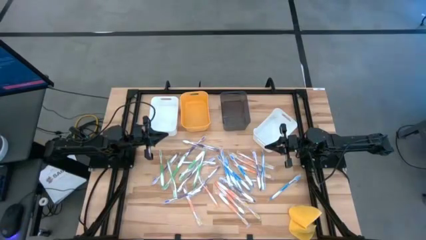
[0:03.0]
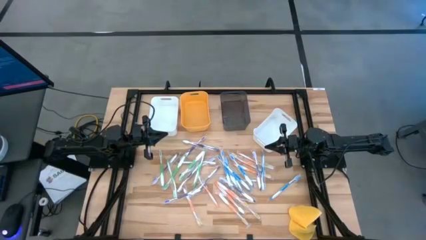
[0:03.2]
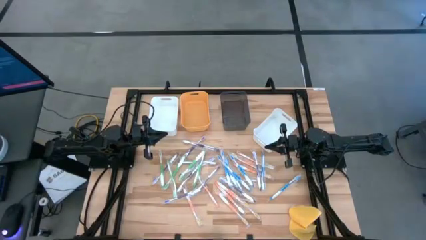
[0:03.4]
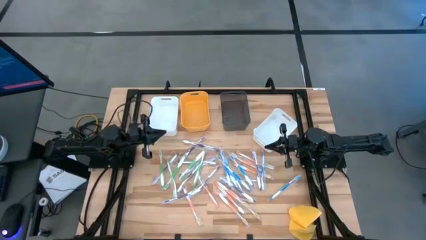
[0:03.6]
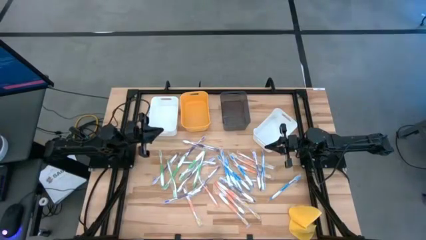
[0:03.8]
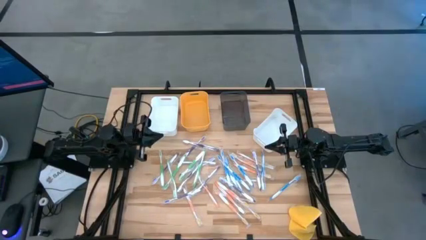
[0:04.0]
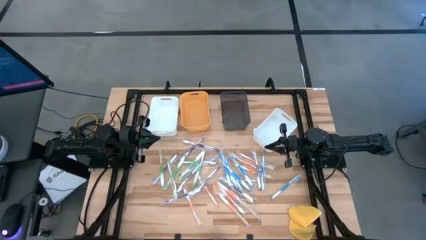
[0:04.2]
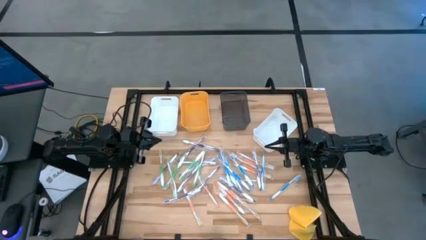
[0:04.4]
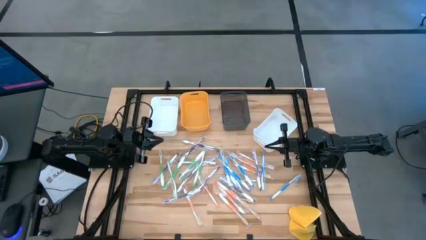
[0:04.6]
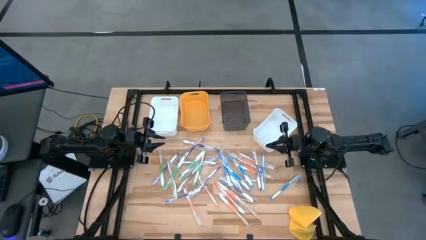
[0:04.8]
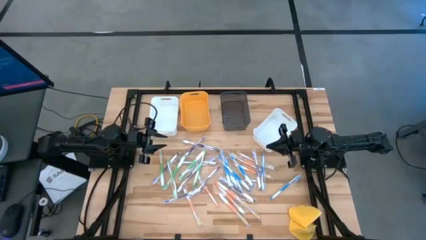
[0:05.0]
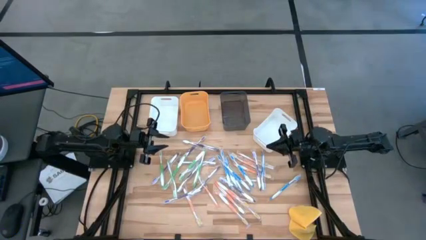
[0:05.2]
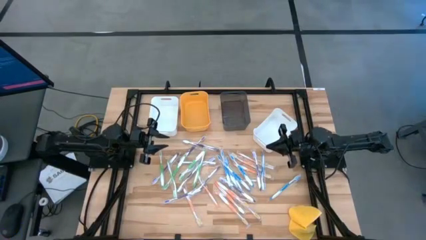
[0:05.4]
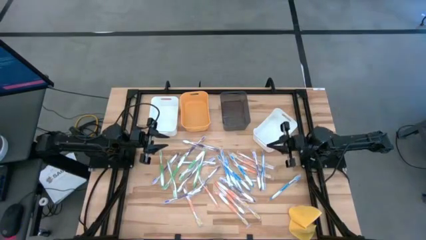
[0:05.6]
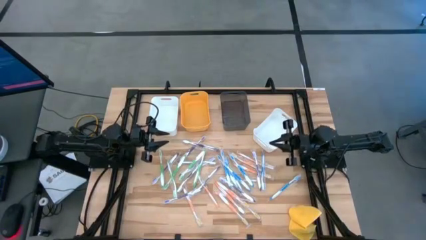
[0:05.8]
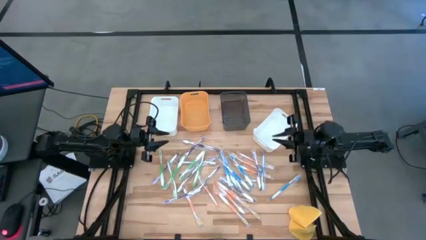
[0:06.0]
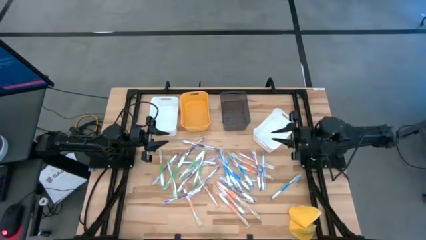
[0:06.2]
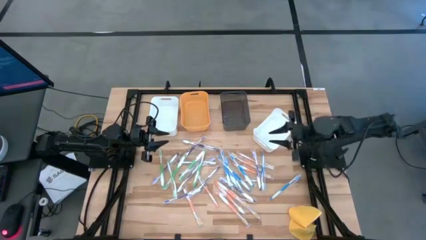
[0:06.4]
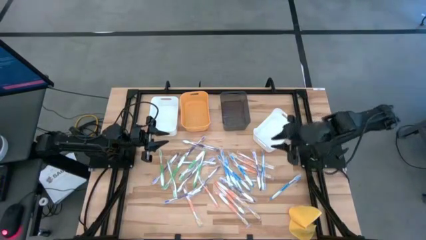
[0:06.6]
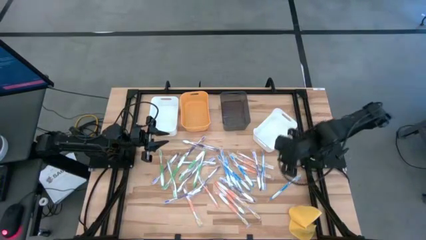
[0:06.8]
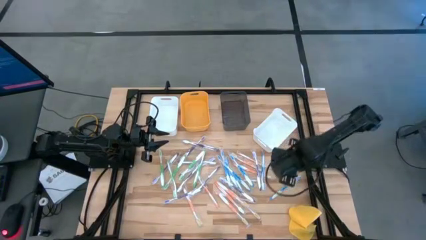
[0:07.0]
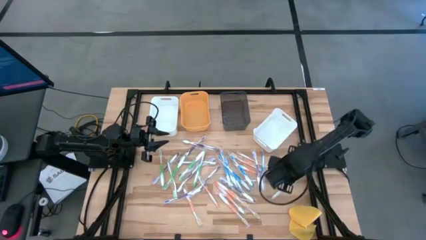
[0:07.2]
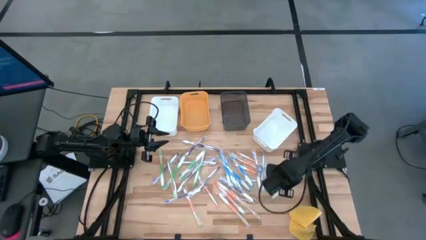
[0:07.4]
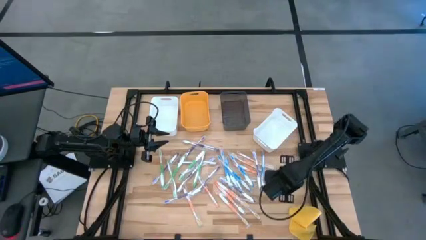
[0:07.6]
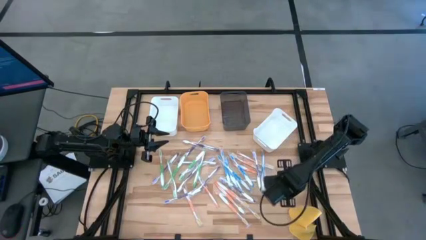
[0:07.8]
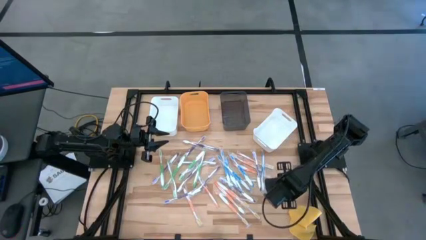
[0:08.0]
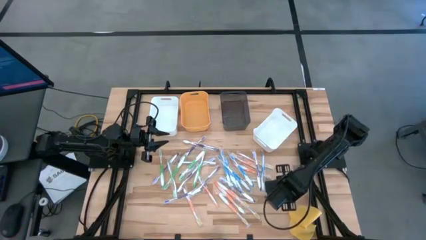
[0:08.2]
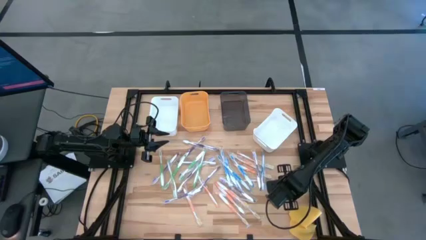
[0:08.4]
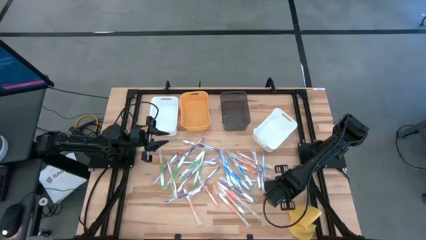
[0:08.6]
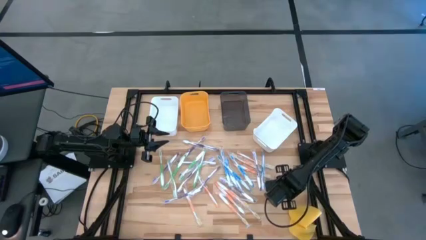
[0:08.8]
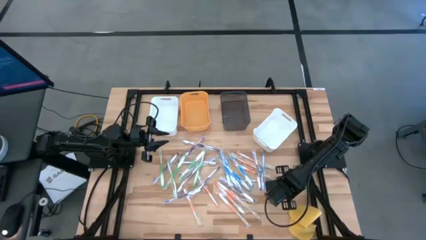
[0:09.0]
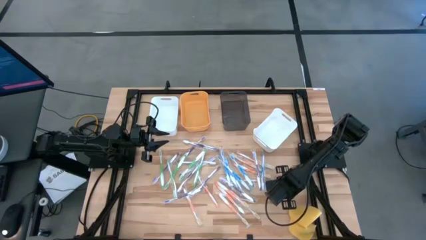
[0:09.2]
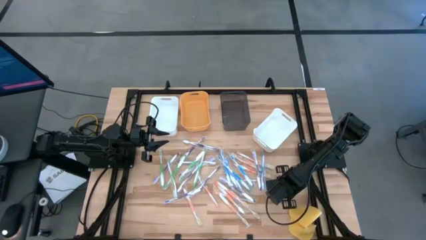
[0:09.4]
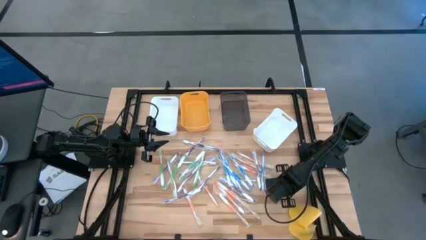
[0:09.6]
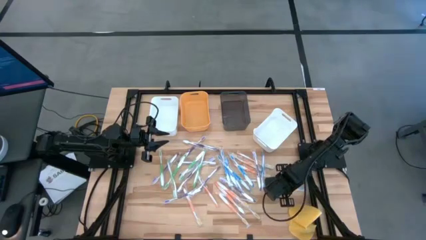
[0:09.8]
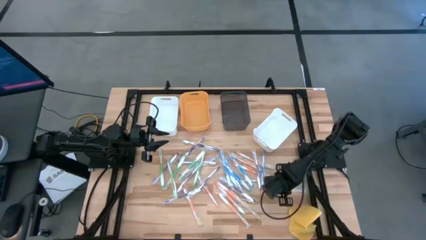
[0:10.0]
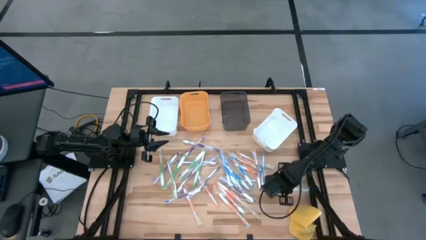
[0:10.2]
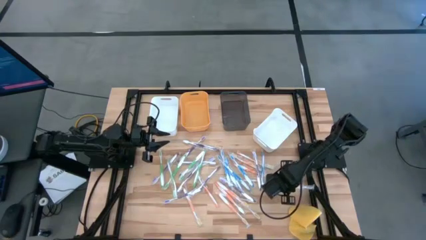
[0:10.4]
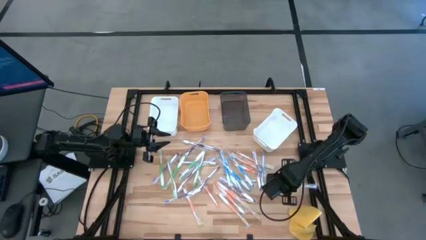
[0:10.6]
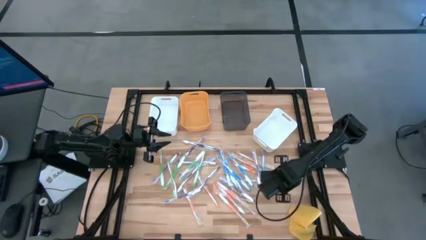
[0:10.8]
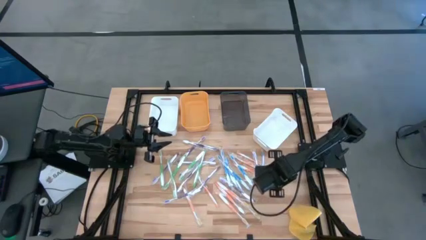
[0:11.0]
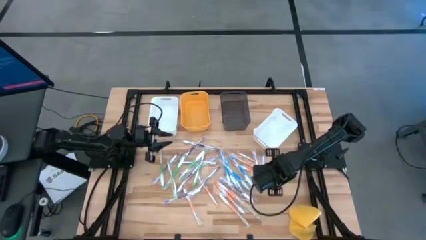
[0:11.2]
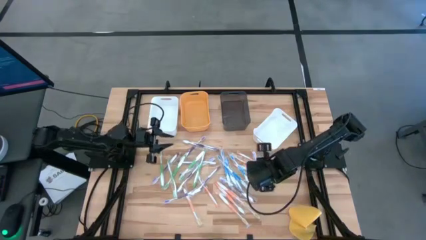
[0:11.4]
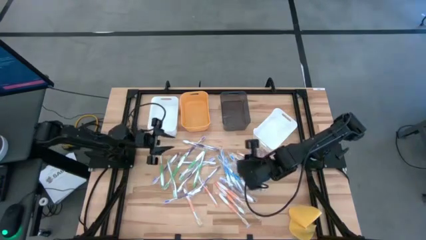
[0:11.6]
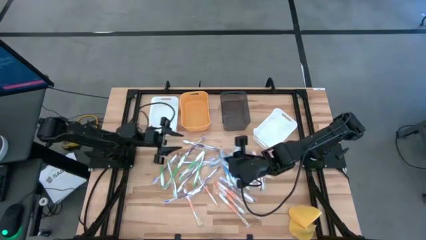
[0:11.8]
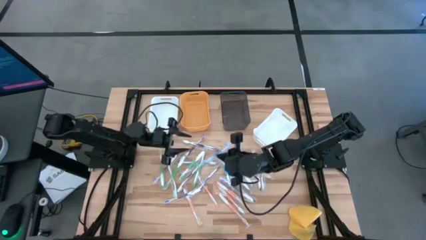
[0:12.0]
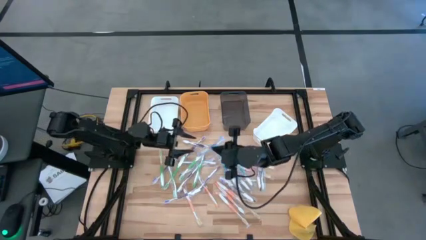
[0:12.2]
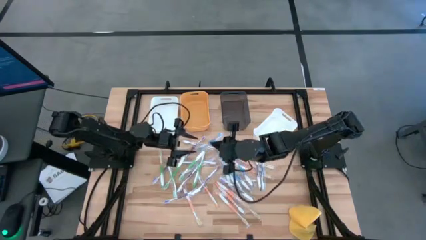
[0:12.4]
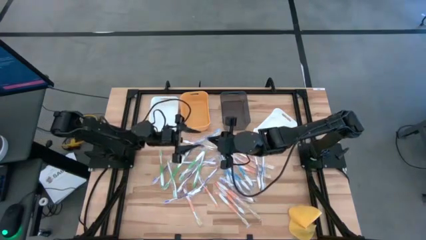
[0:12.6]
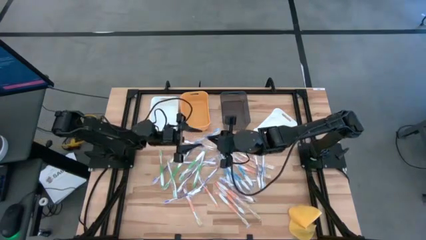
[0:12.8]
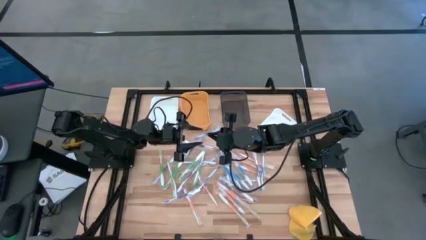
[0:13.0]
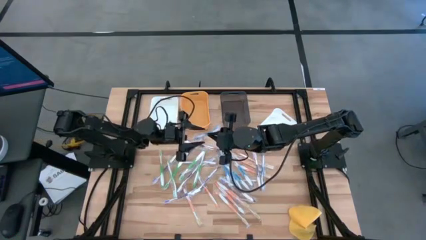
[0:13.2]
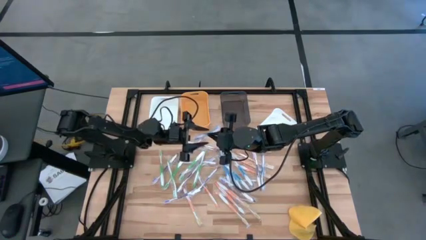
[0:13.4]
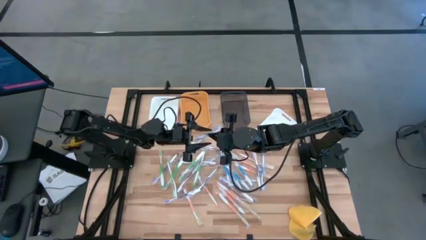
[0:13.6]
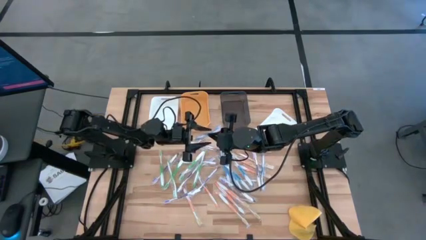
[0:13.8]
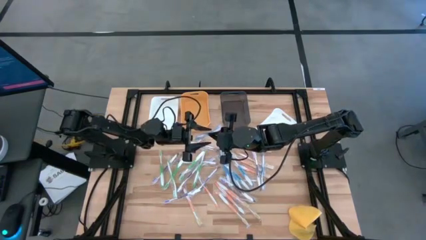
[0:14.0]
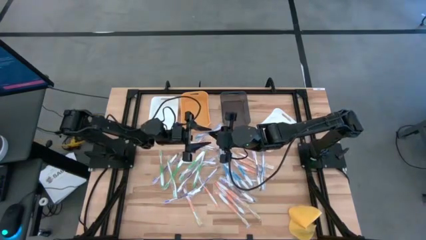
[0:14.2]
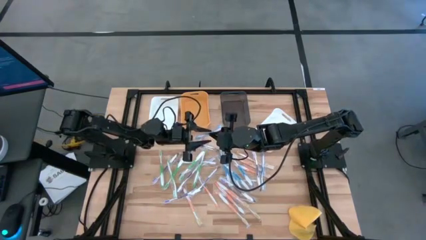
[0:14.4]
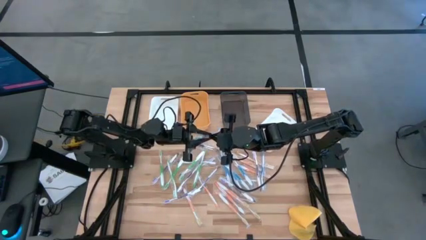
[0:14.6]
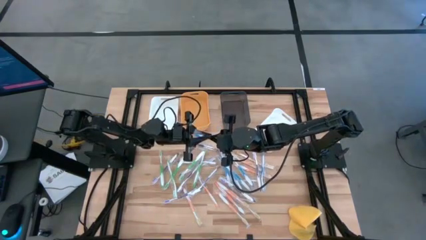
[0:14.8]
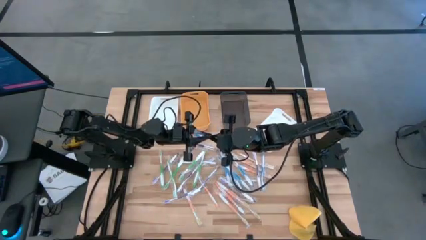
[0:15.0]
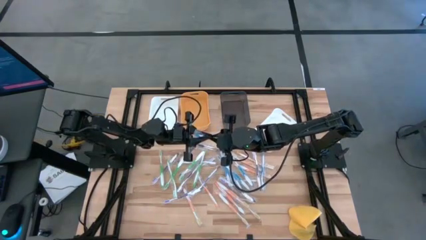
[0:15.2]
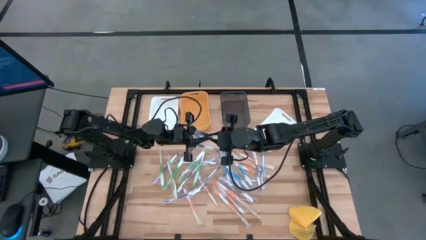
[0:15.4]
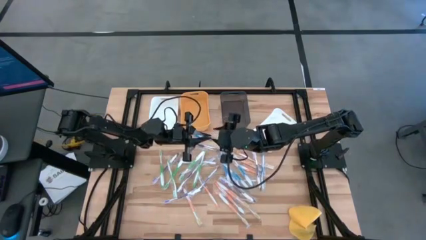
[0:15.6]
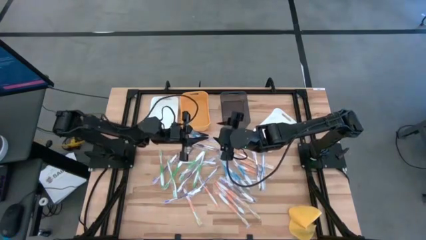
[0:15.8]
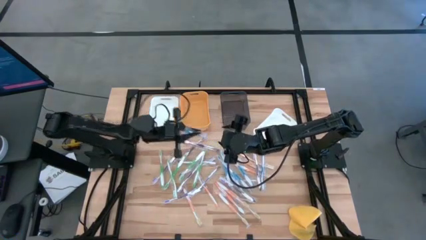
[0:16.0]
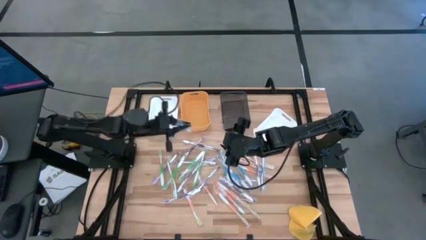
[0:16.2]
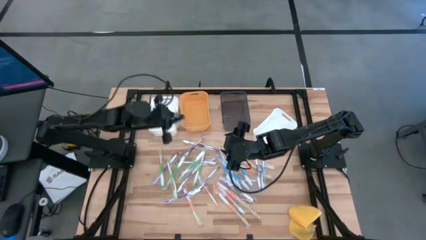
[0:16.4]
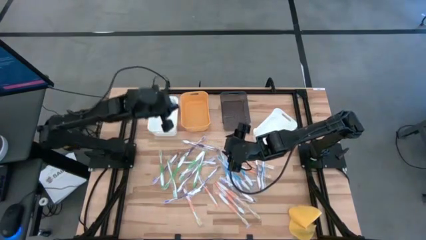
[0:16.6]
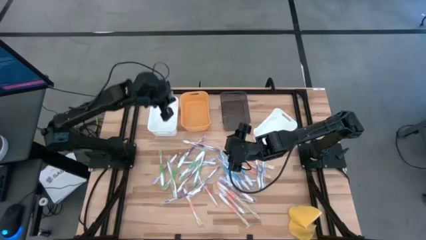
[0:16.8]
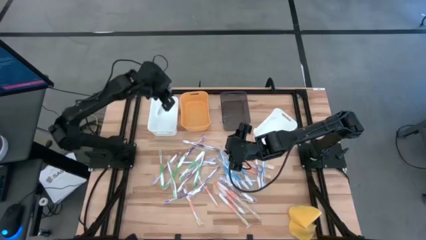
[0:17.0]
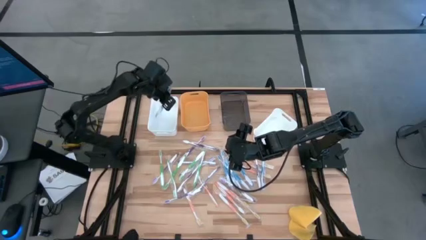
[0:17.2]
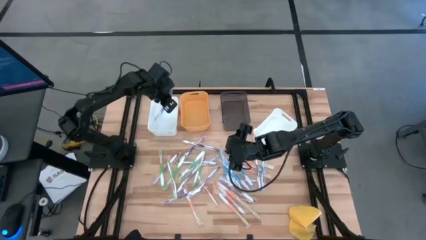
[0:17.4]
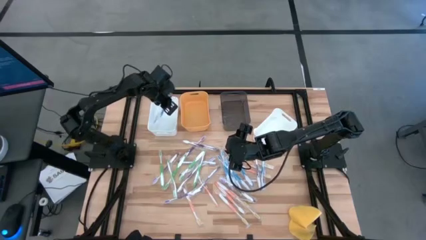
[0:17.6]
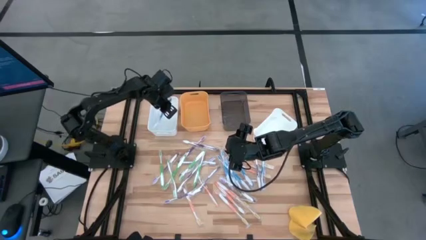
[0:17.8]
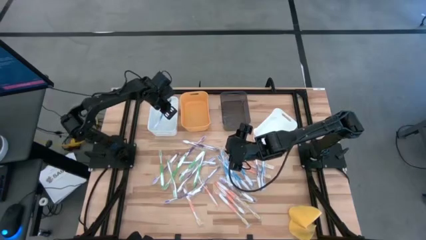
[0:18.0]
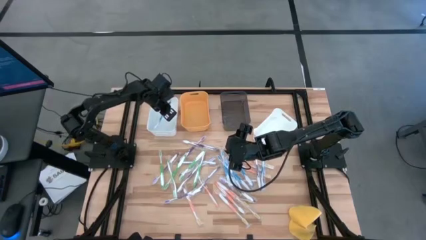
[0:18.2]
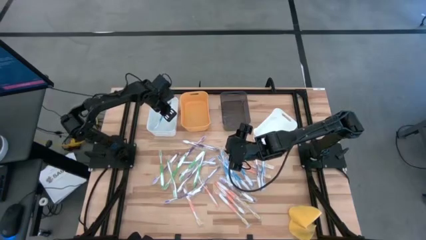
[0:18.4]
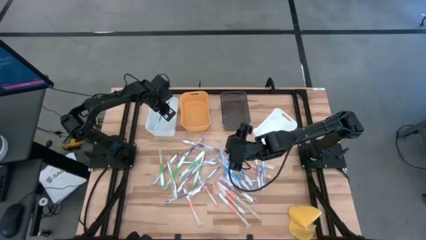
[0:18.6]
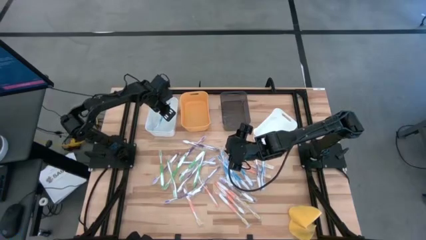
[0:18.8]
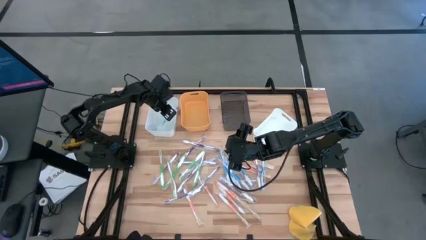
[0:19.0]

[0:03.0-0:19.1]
Task: Pick & Place Toothbrushes
Put the blue toothbrush into the left white bin
